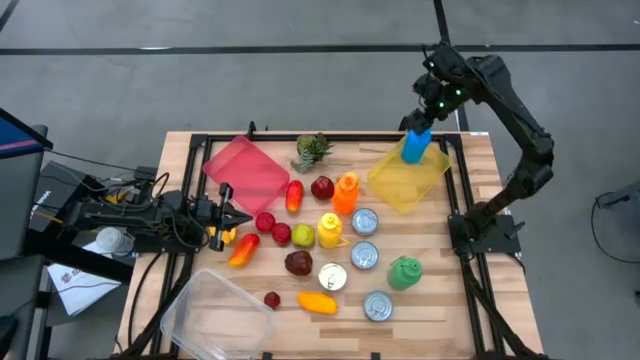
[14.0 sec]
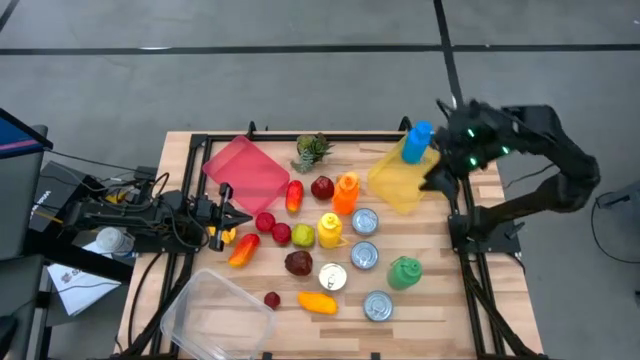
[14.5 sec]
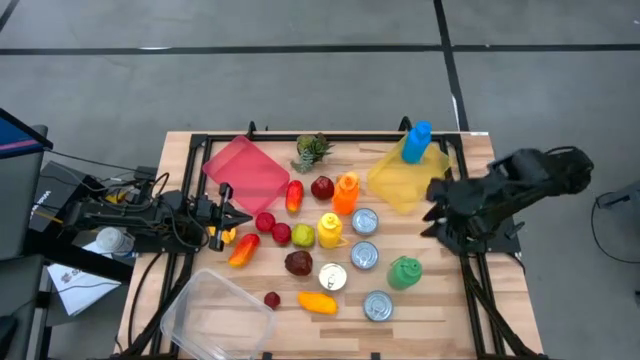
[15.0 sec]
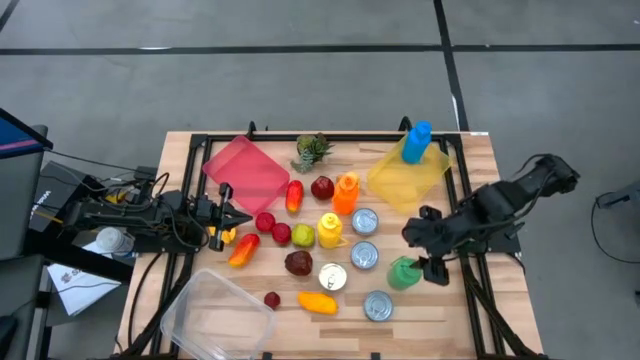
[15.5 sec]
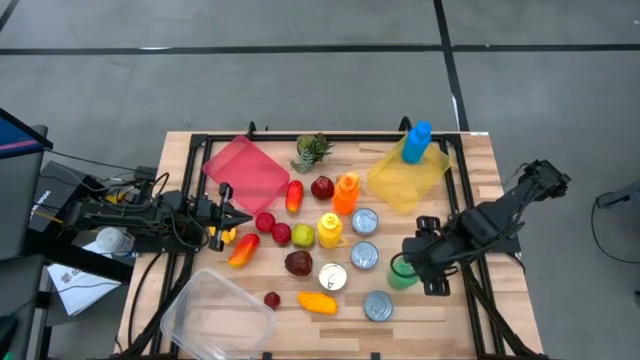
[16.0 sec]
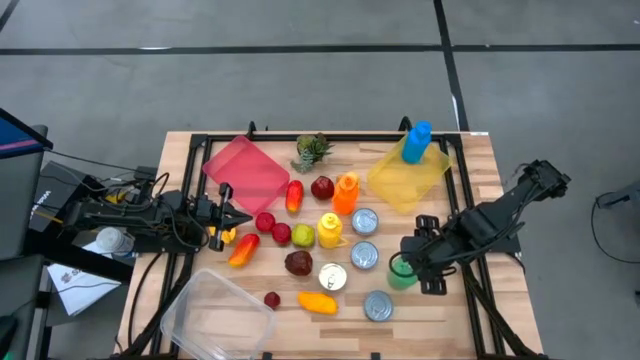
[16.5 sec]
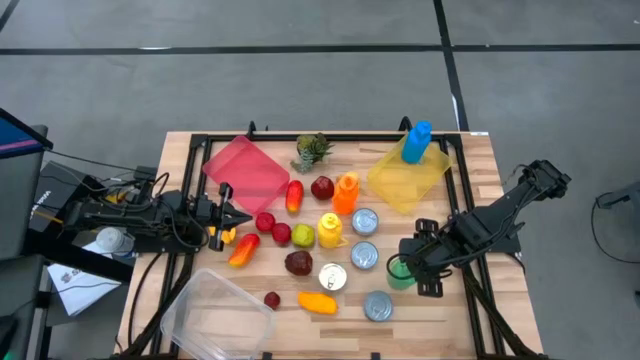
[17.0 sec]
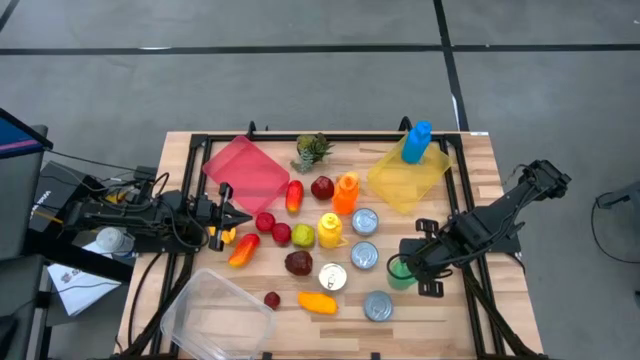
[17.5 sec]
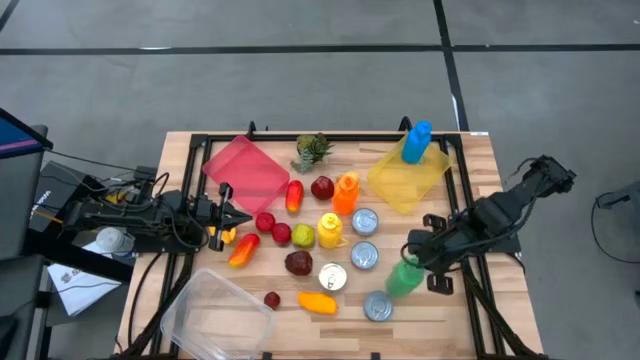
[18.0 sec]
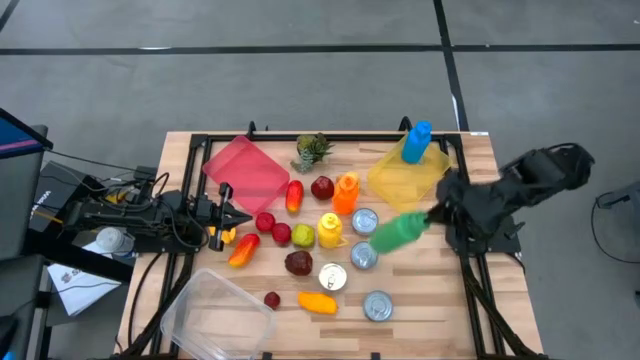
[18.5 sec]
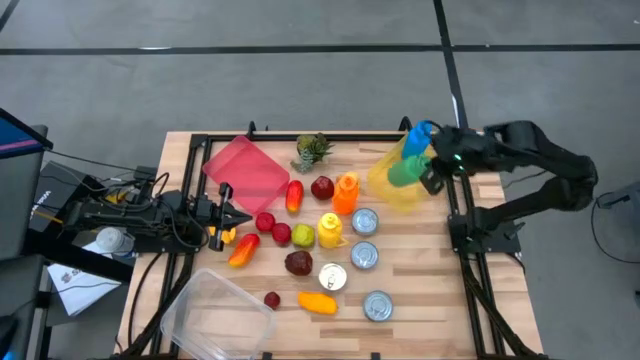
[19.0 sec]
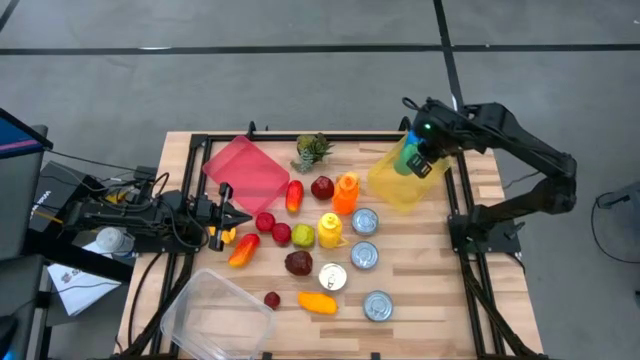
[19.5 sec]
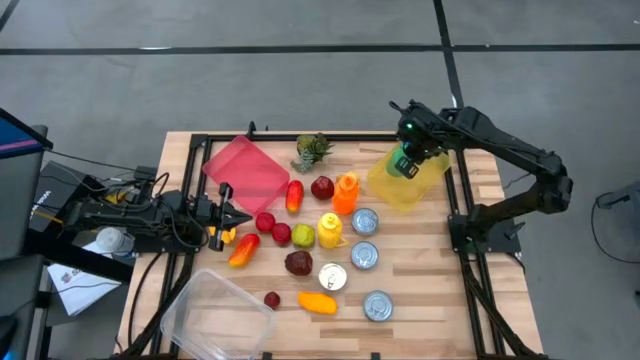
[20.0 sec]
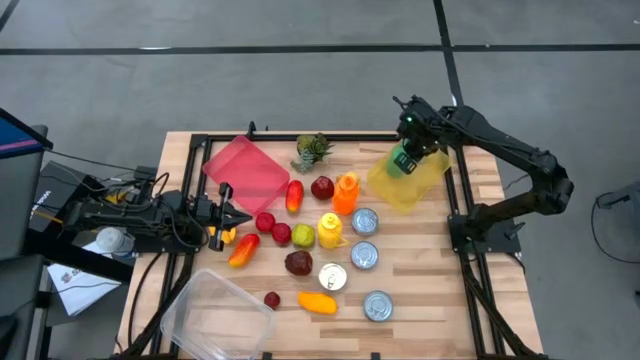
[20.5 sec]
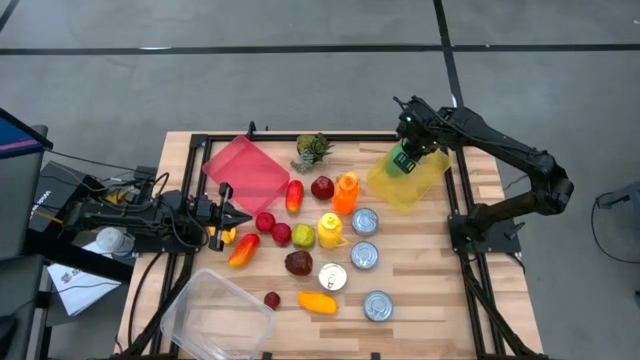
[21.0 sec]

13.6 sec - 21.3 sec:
Task: Pick & Place Food Item
Put the green tumbler into the yellow bin

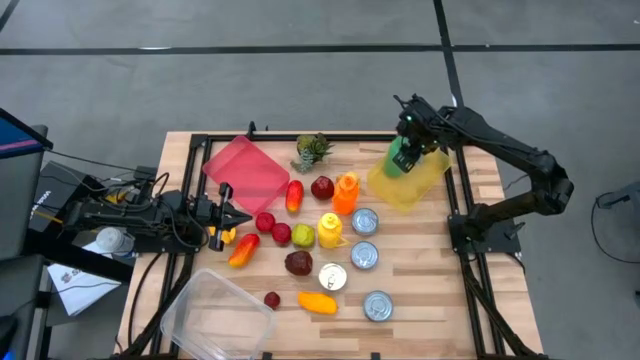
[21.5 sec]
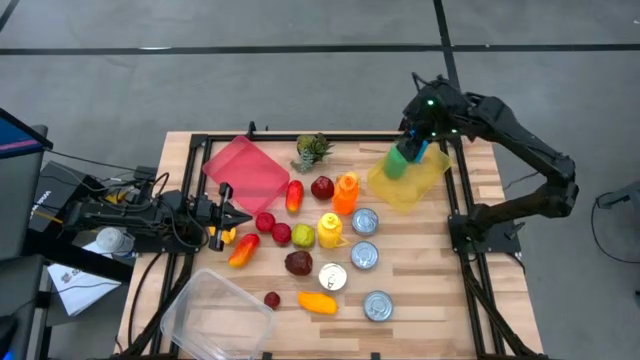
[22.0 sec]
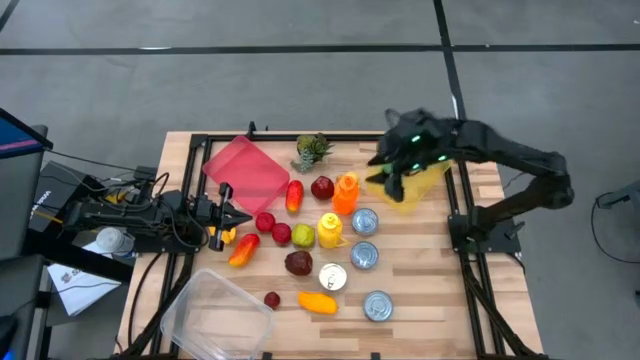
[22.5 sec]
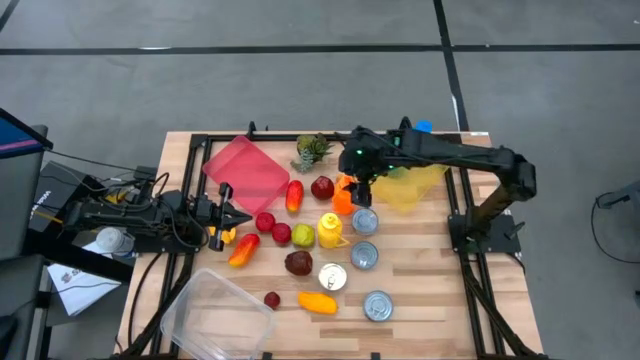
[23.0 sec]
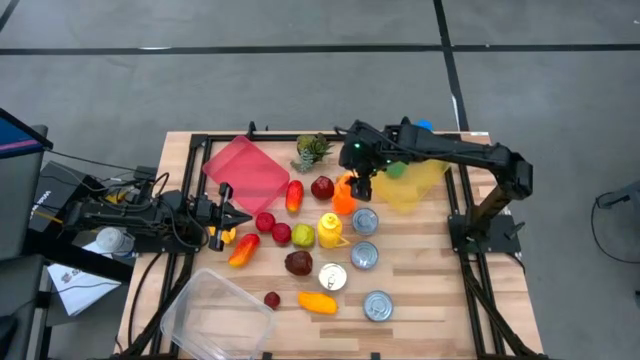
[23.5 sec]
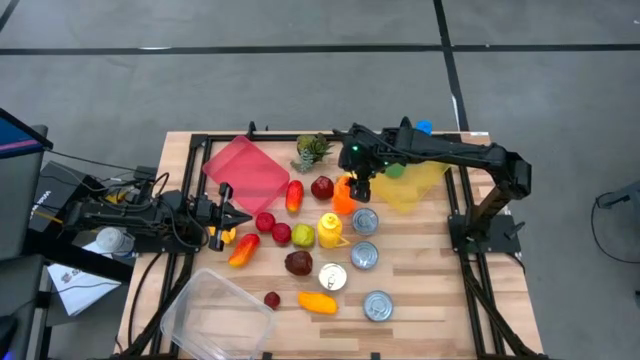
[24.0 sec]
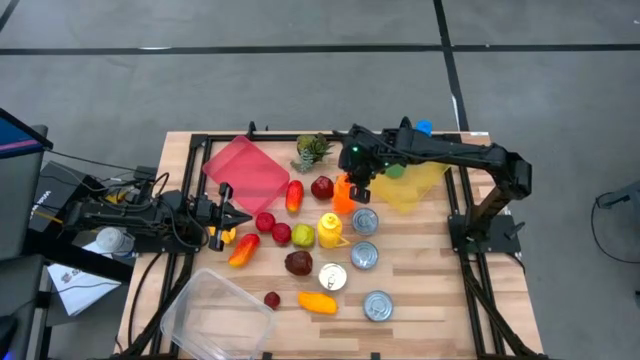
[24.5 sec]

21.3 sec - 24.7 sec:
Put the orange tumbler into the yellow bin

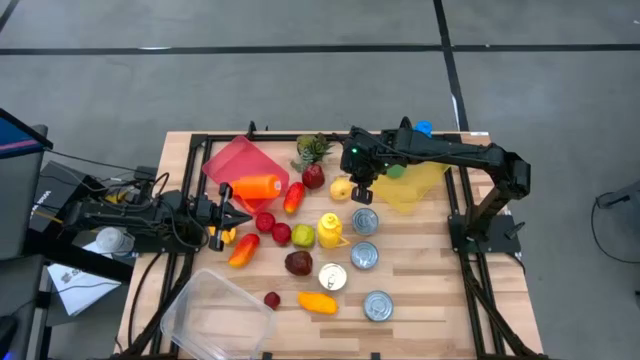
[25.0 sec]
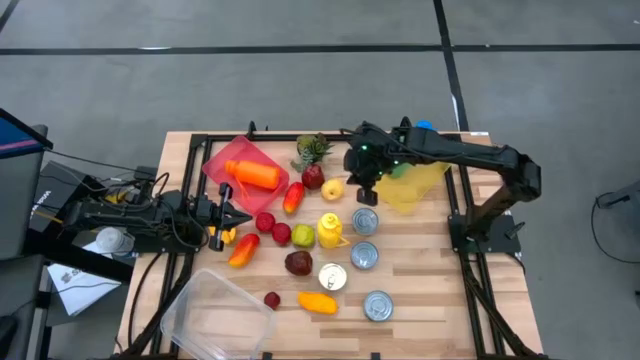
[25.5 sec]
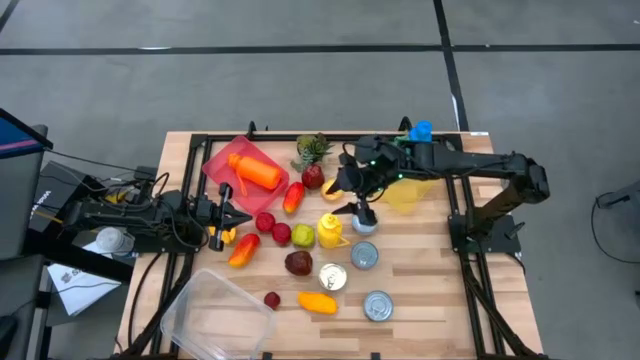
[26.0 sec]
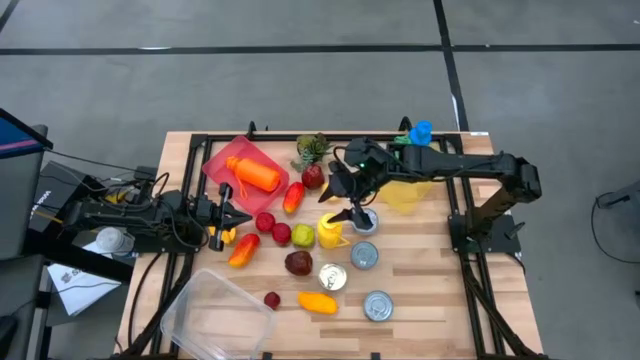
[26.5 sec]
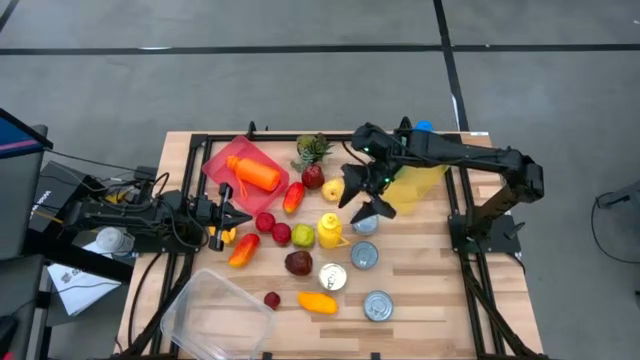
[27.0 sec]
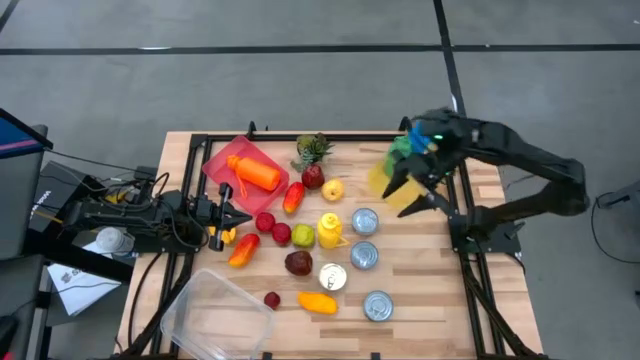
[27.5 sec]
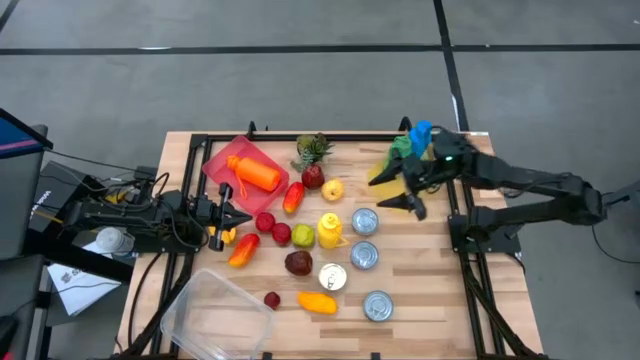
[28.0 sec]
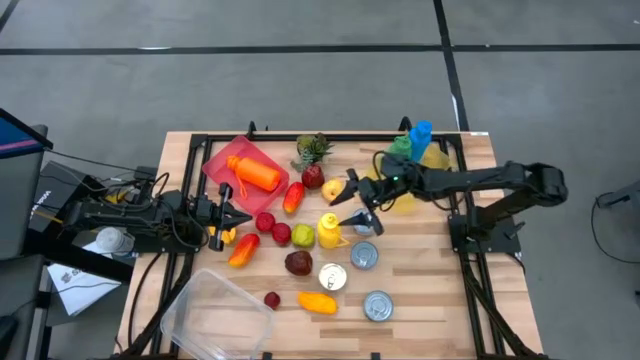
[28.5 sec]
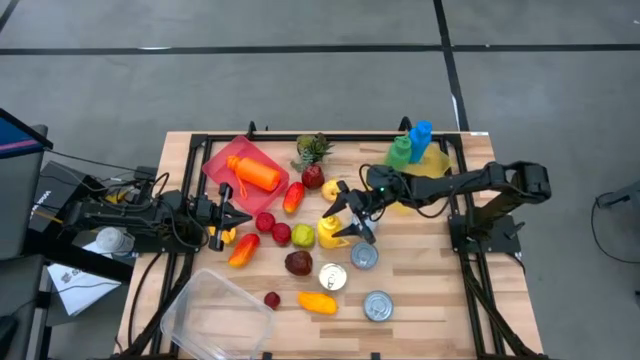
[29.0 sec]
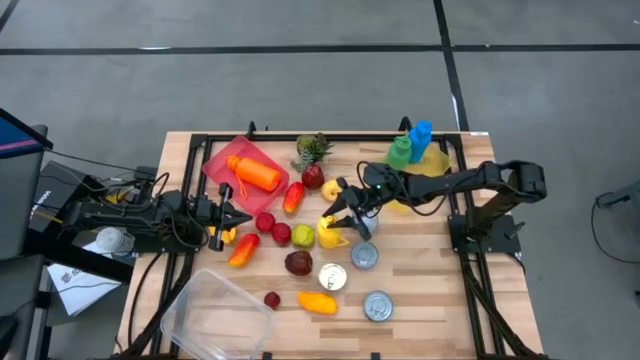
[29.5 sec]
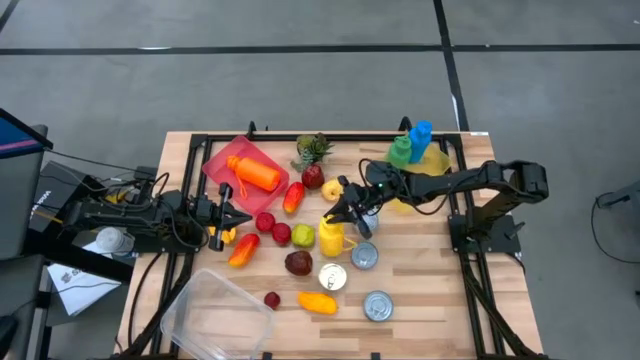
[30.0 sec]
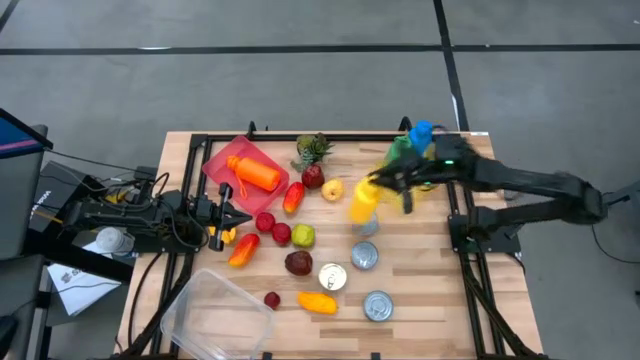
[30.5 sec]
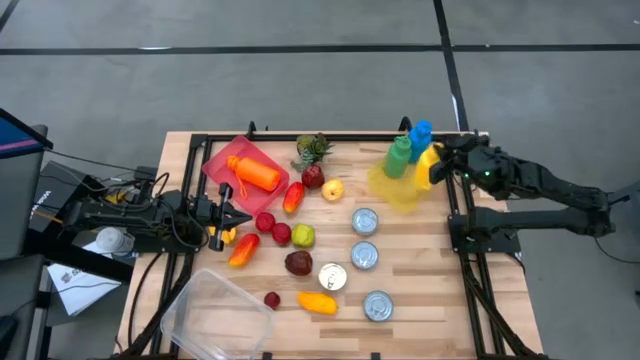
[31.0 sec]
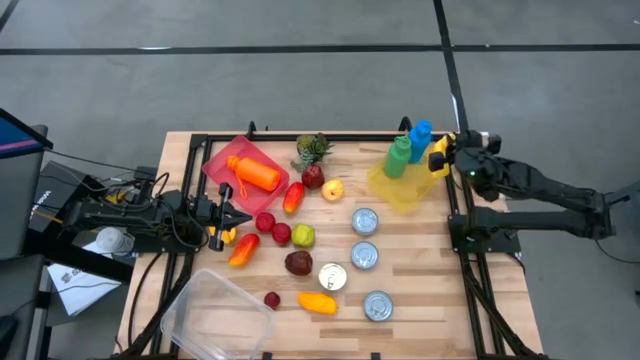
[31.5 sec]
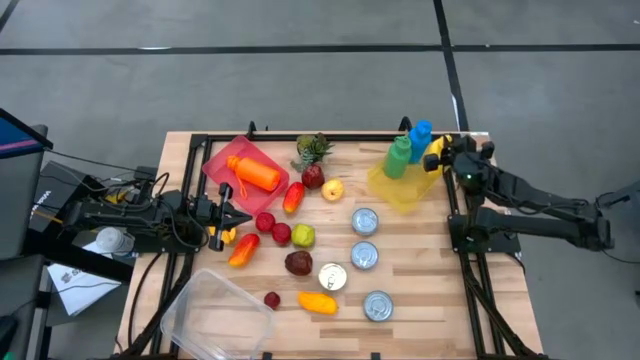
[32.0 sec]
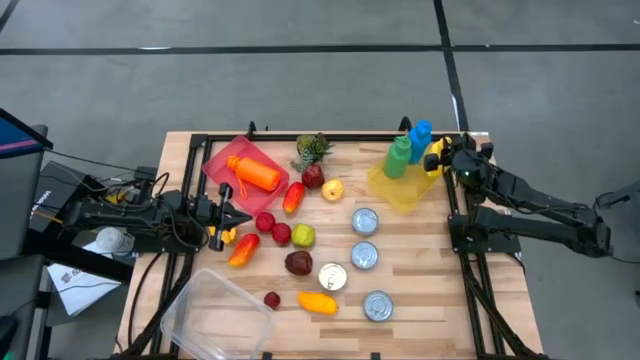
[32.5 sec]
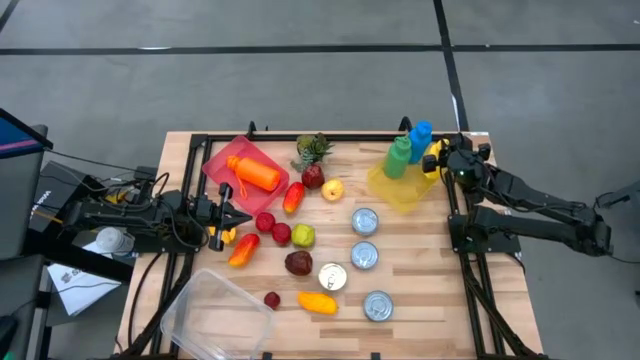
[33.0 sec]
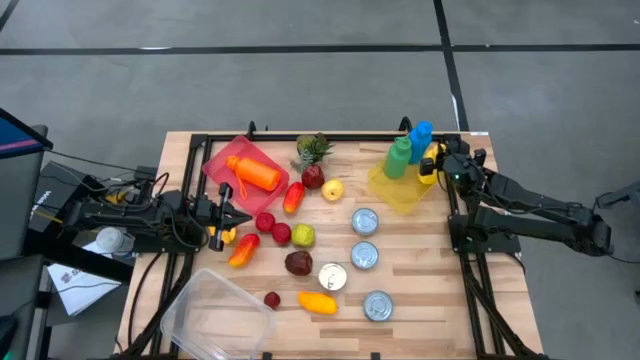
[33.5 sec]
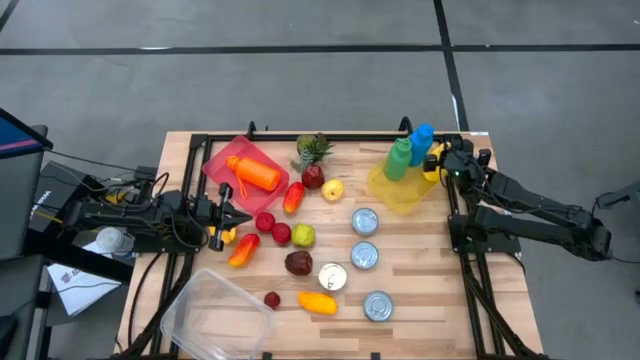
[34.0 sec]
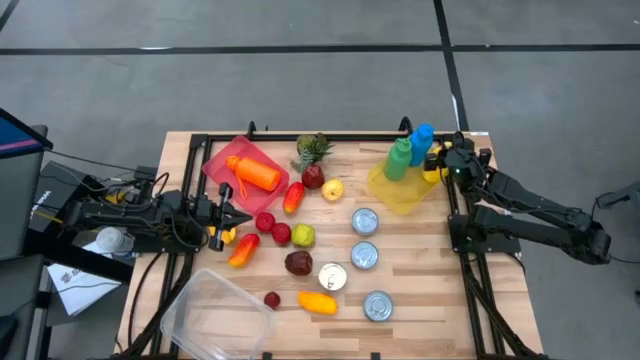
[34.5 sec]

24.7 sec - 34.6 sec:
Put the yellow tumbler into the yellow bin
